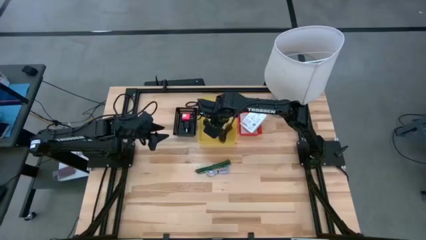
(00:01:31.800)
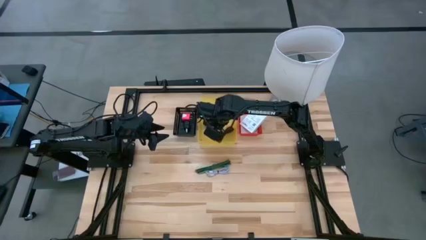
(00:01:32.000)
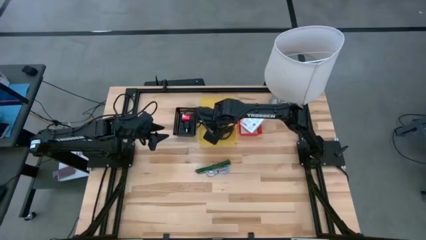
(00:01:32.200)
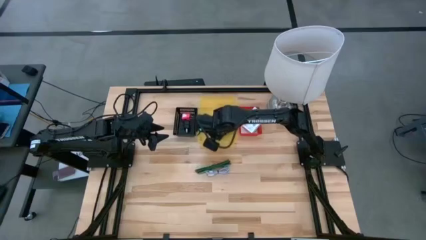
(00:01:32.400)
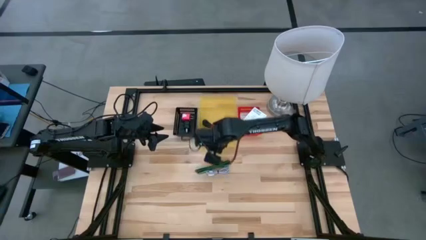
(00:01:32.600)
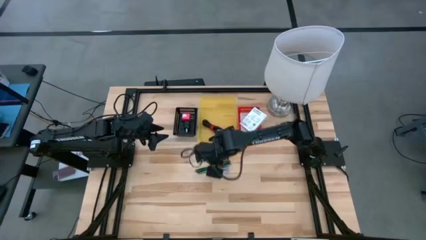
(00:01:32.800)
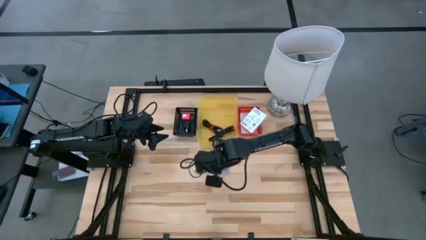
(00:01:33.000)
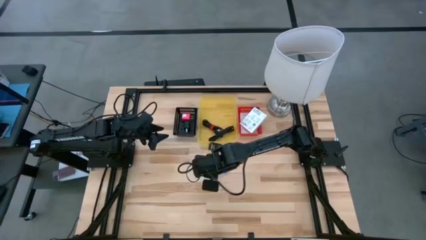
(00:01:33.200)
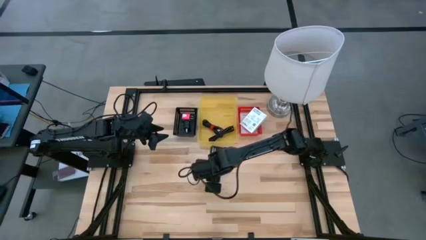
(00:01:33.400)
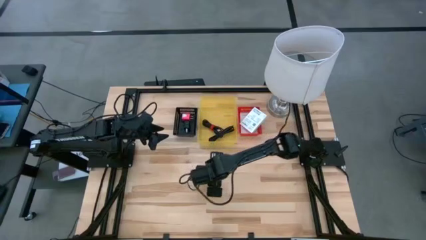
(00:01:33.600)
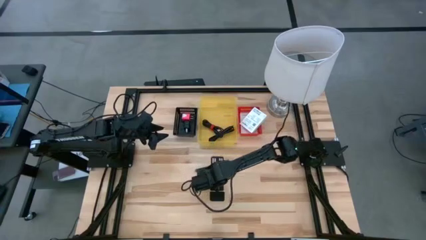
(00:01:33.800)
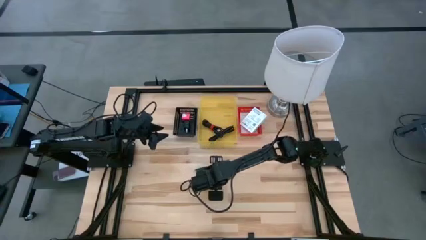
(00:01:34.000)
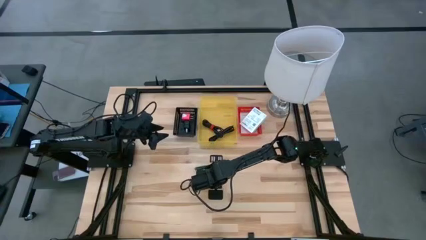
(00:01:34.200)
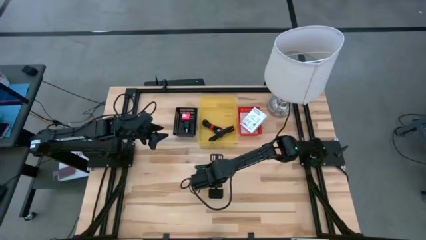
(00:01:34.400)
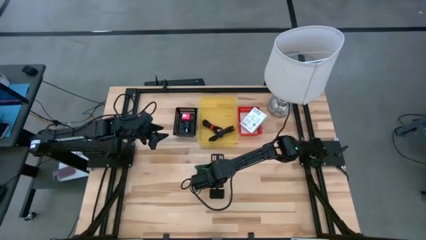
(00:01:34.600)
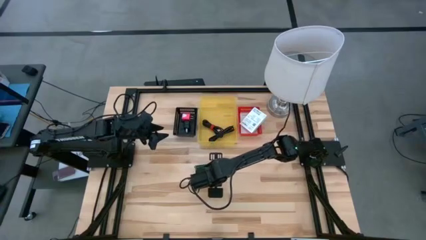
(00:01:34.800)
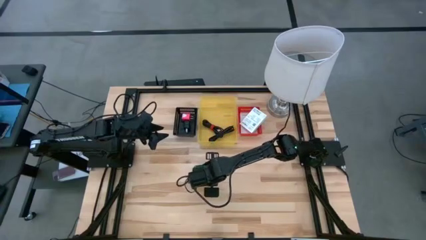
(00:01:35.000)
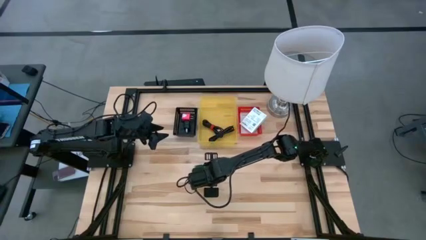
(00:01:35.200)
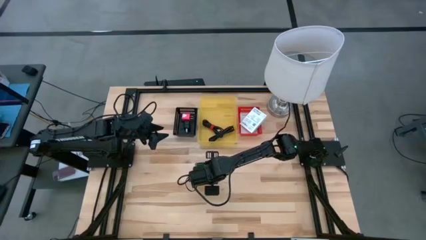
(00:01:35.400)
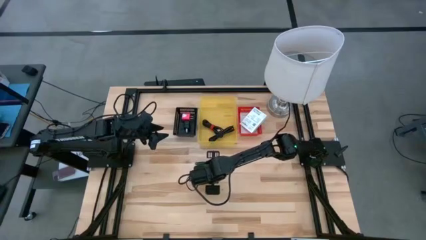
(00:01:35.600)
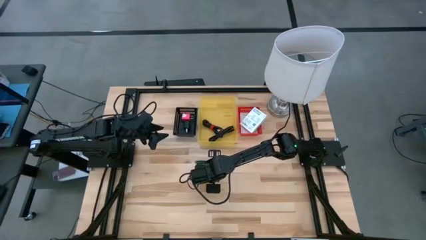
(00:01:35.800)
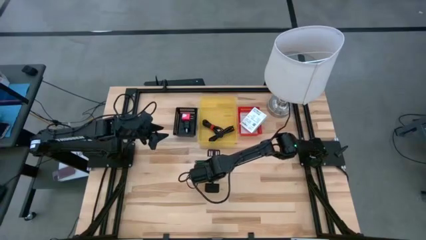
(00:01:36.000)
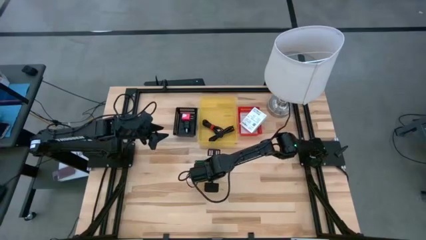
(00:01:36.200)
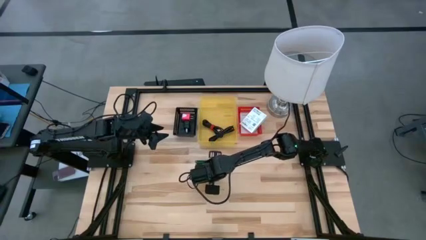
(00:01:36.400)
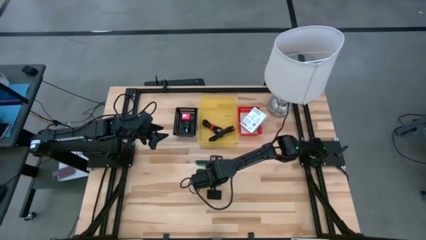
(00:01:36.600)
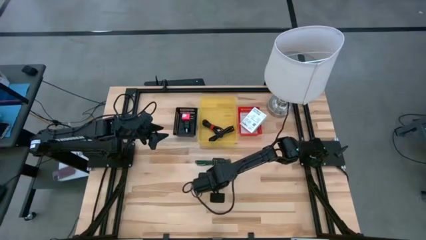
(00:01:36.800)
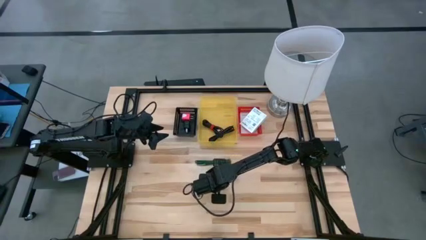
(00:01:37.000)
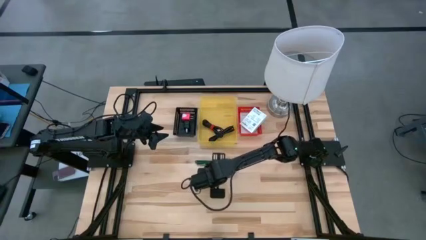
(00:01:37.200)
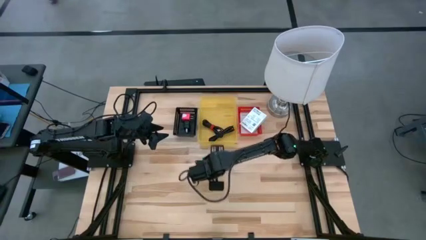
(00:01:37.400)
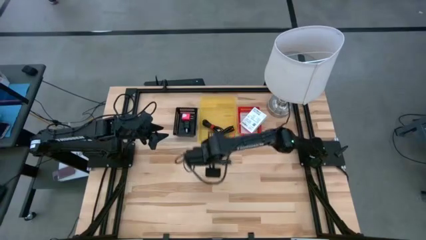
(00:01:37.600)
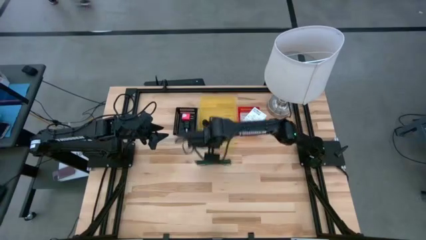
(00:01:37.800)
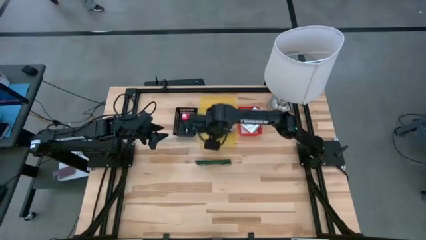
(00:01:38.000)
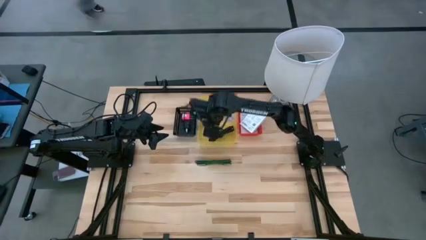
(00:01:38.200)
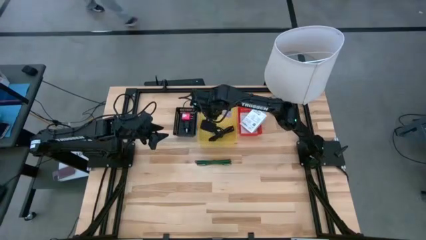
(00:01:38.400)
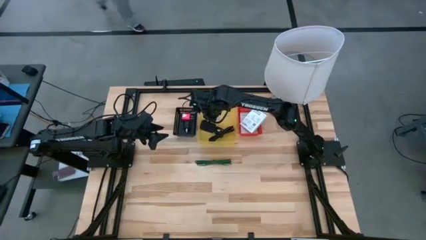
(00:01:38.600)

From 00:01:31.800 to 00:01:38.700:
Task: Pick and place items into bin
Put the light blue charger cable into the yellow bin

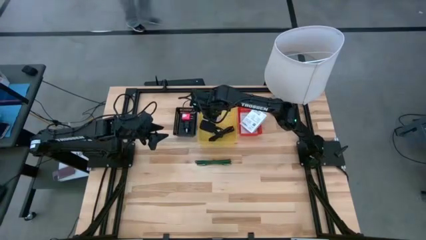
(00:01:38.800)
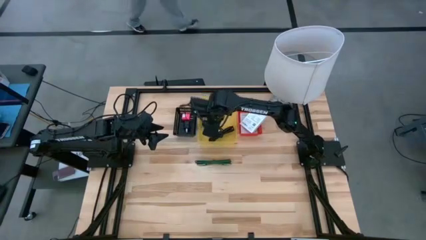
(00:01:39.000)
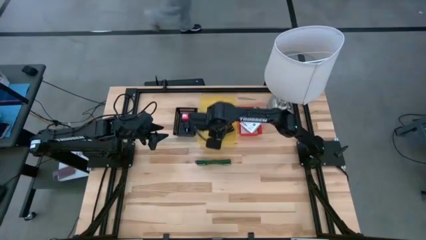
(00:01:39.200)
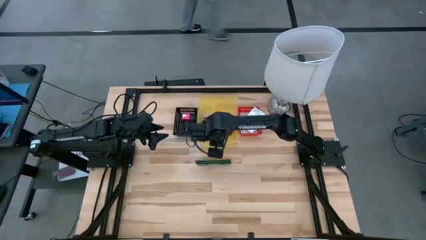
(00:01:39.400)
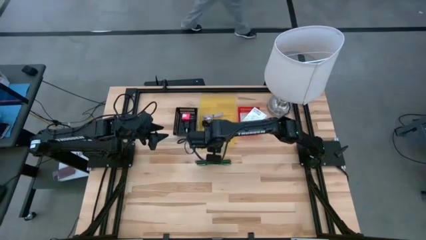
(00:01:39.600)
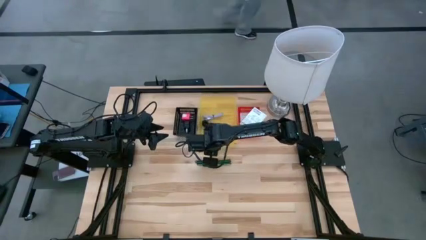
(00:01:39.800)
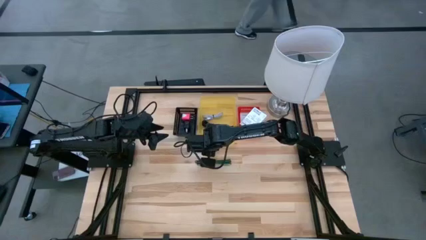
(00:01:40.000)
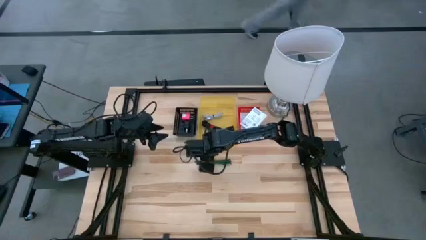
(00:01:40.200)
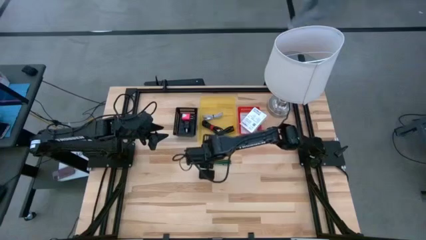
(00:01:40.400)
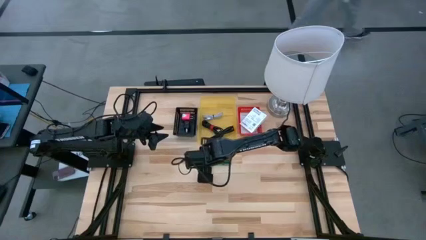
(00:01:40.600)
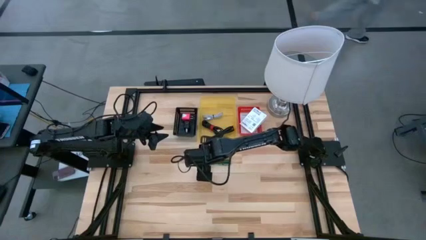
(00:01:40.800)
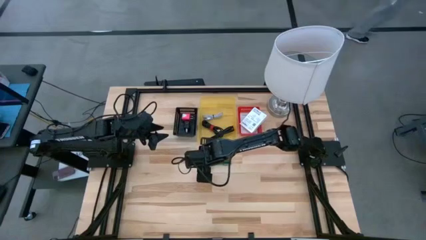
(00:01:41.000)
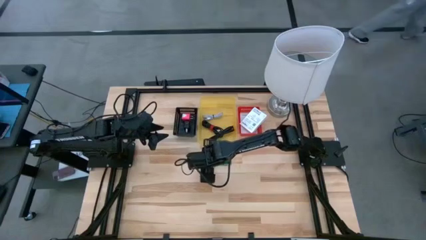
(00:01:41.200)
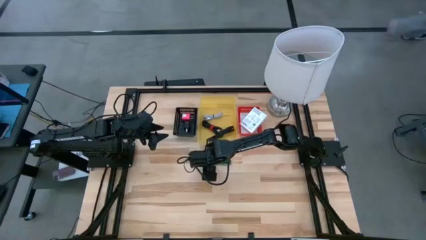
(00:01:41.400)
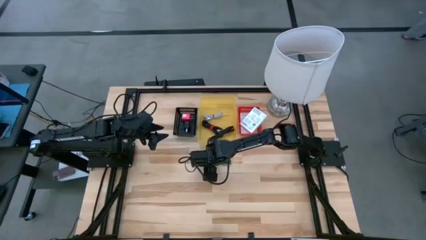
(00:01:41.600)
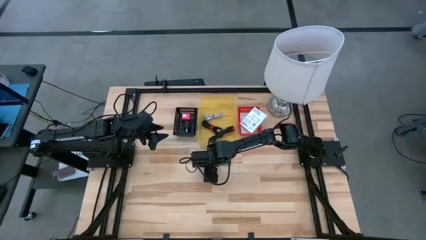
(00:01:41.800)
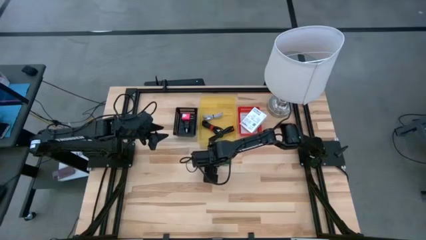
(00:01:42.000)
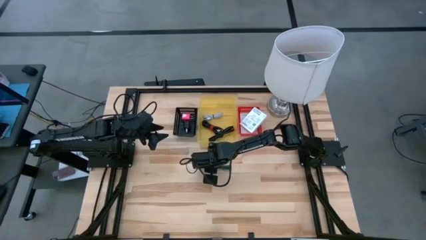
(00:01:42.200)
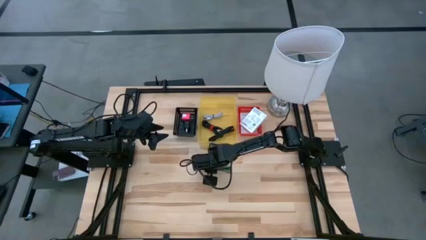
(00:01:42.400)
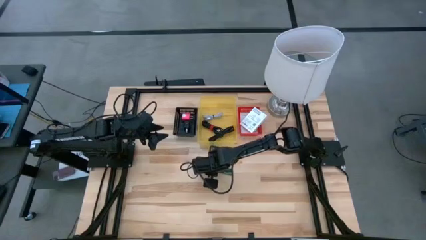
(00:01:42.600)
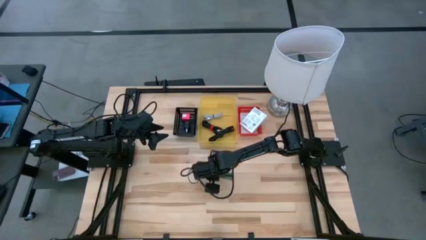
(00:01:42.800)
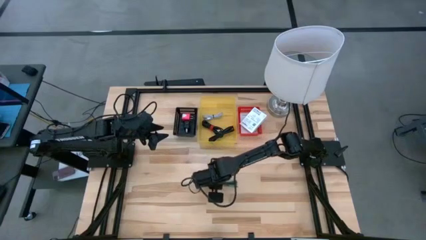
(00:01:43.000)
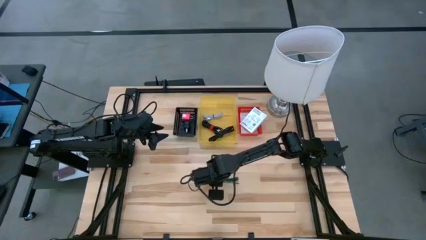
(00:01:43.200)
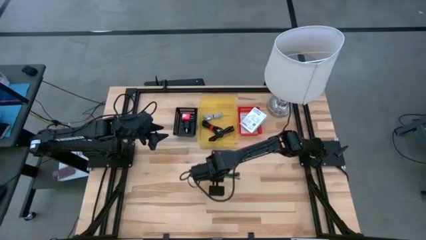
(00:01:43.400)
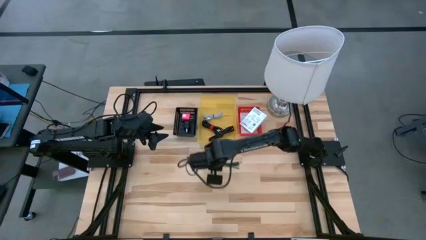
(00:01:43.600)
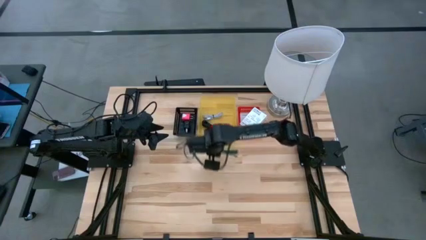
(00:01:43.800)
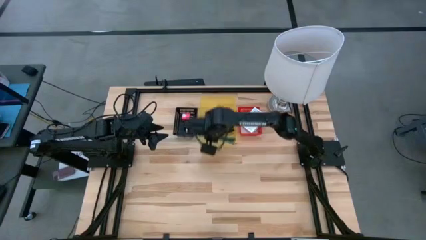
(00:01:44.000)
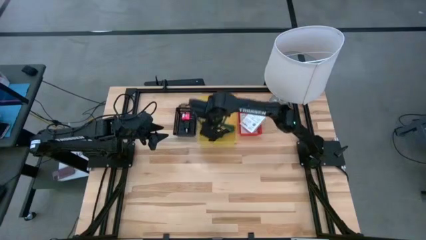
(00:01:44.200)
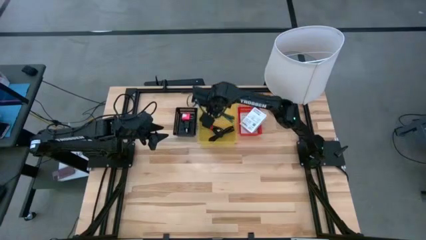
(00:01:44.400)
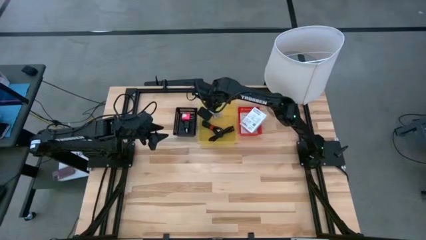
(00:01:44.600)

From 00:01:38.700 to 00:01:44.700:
Put the green charger cable into the yellow bin
